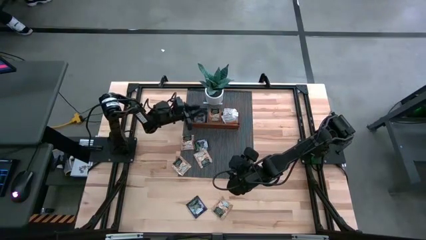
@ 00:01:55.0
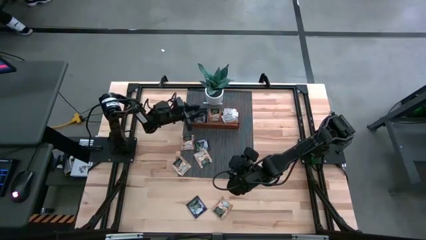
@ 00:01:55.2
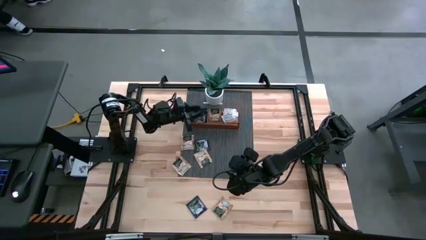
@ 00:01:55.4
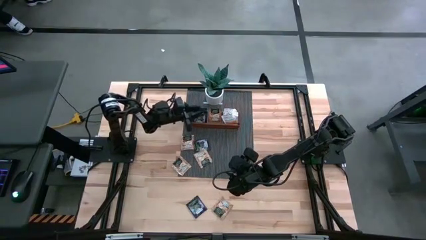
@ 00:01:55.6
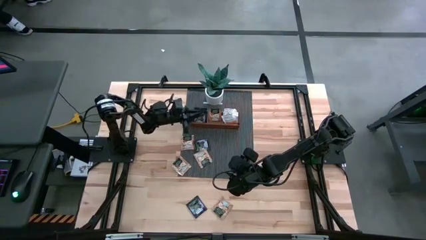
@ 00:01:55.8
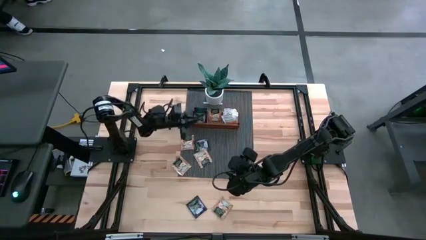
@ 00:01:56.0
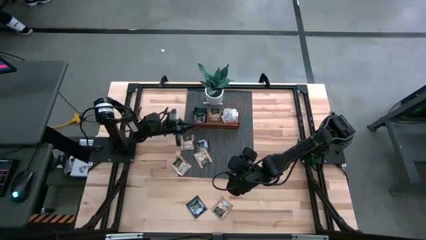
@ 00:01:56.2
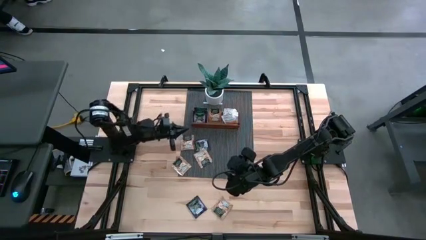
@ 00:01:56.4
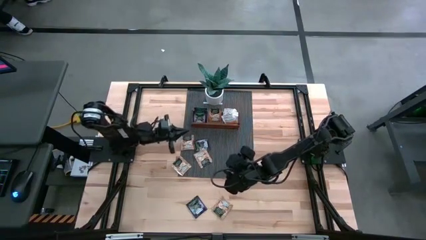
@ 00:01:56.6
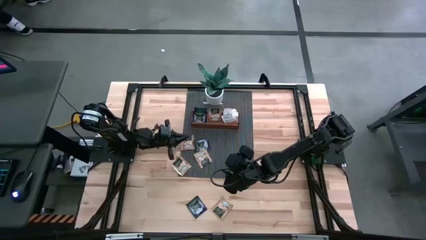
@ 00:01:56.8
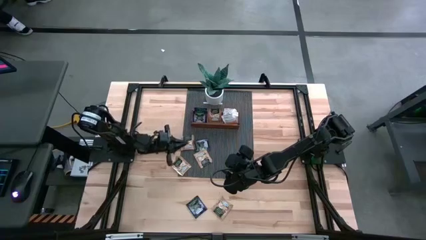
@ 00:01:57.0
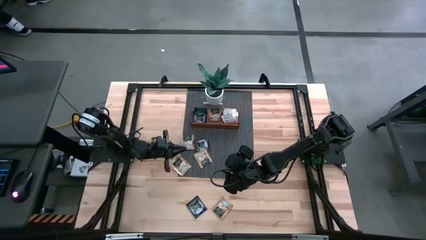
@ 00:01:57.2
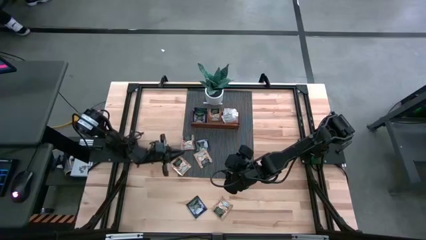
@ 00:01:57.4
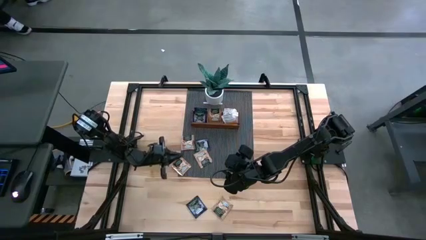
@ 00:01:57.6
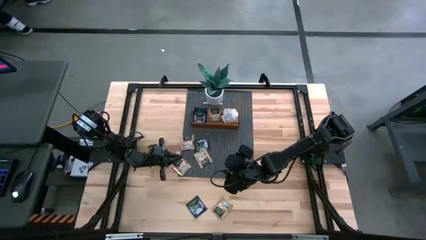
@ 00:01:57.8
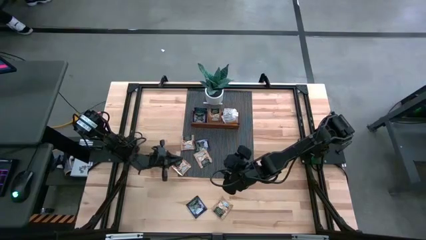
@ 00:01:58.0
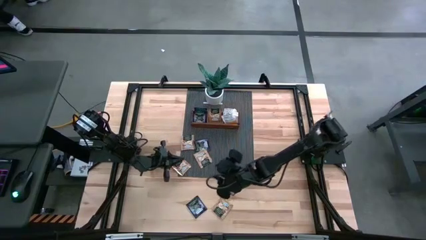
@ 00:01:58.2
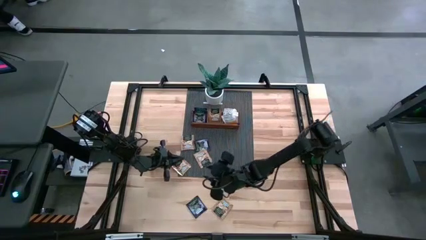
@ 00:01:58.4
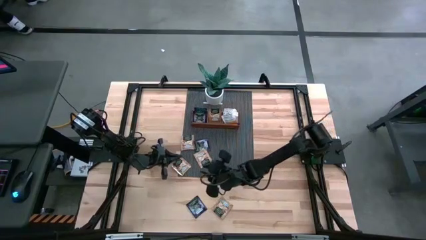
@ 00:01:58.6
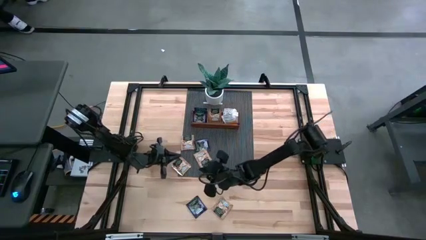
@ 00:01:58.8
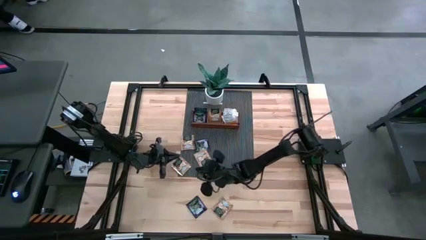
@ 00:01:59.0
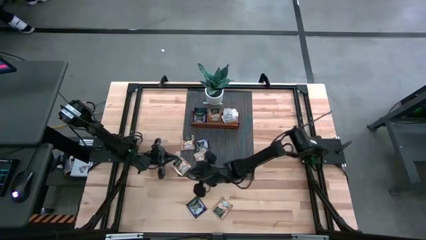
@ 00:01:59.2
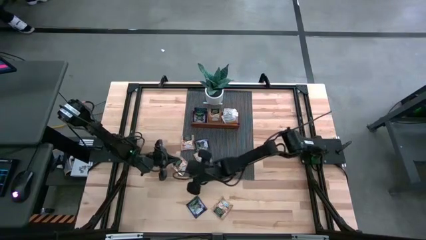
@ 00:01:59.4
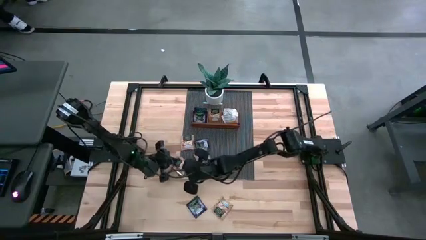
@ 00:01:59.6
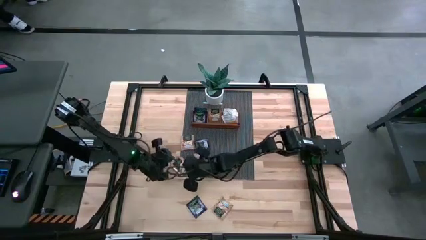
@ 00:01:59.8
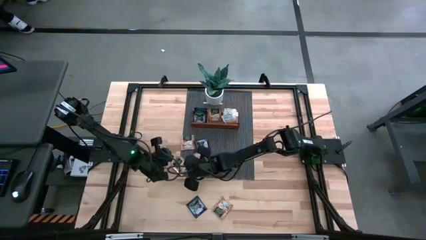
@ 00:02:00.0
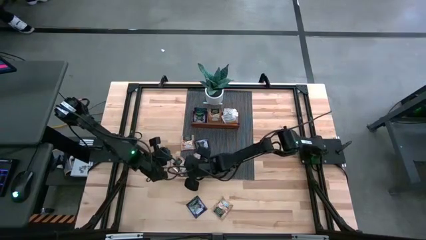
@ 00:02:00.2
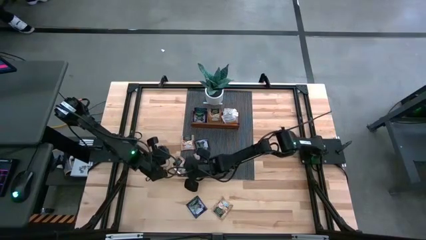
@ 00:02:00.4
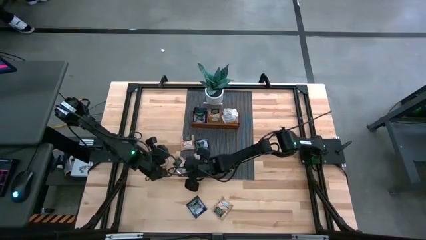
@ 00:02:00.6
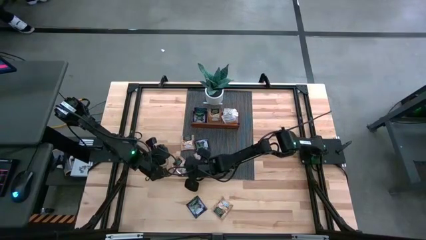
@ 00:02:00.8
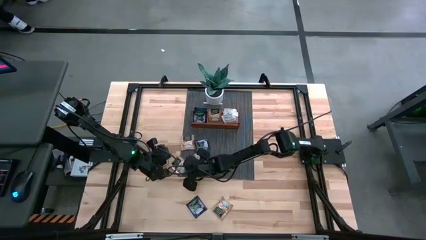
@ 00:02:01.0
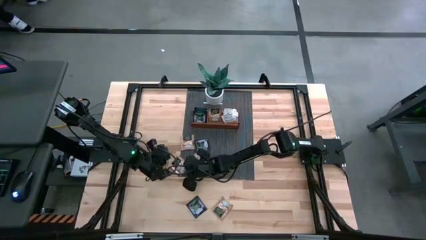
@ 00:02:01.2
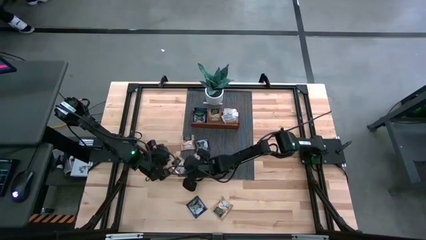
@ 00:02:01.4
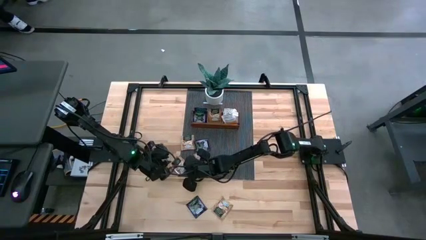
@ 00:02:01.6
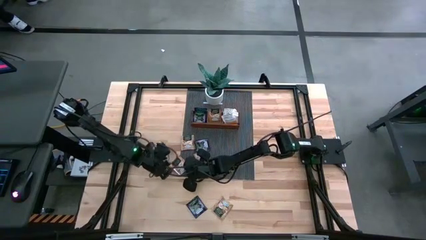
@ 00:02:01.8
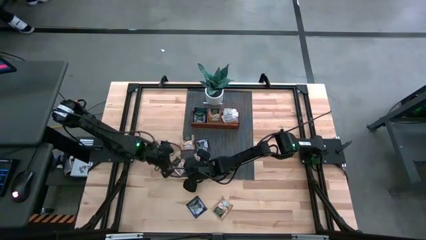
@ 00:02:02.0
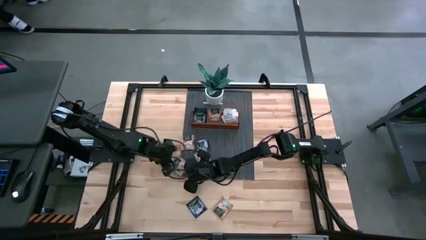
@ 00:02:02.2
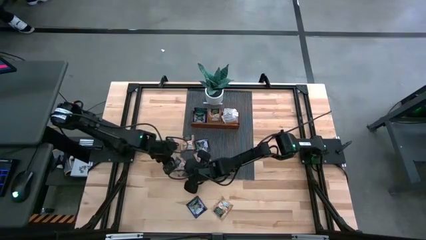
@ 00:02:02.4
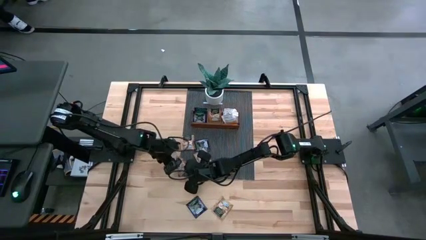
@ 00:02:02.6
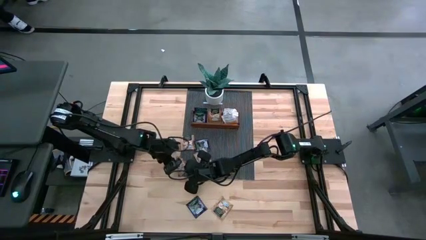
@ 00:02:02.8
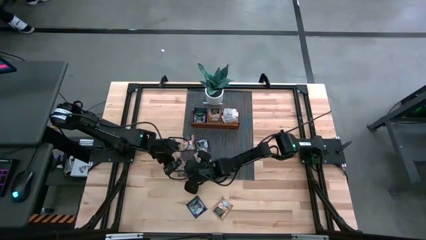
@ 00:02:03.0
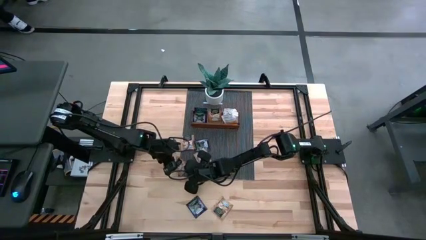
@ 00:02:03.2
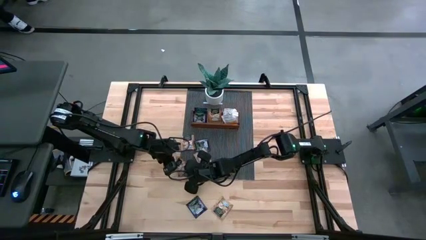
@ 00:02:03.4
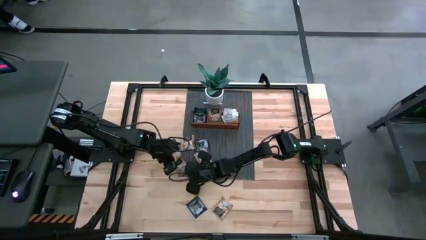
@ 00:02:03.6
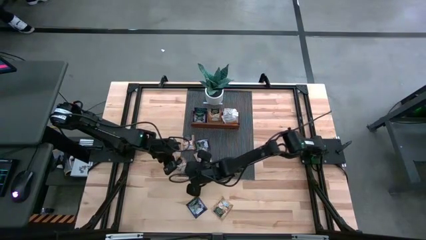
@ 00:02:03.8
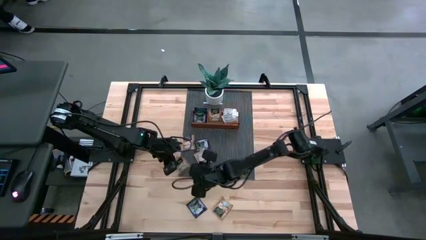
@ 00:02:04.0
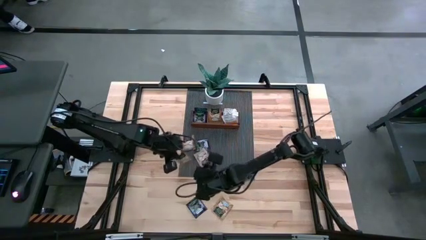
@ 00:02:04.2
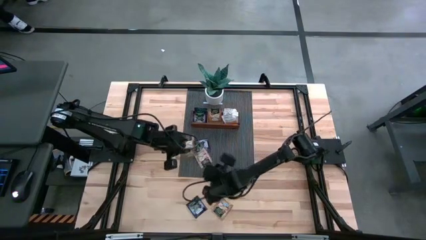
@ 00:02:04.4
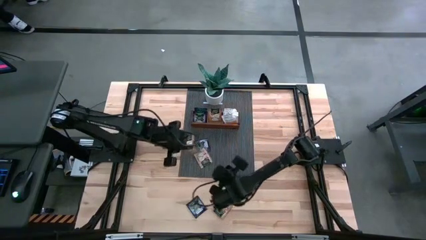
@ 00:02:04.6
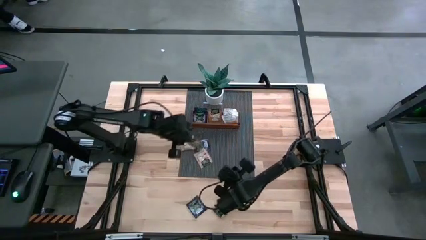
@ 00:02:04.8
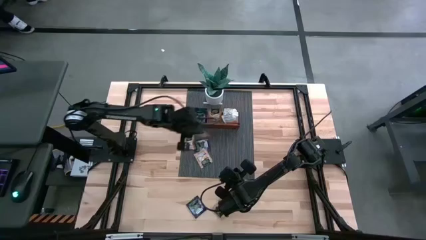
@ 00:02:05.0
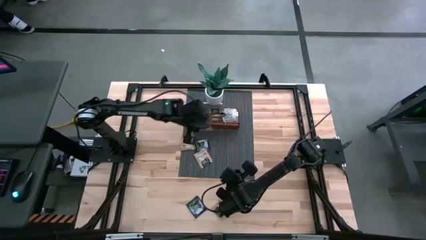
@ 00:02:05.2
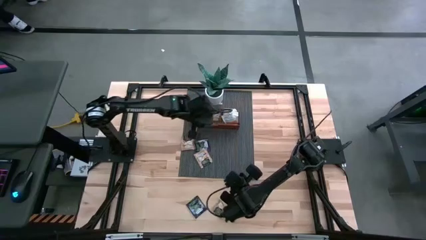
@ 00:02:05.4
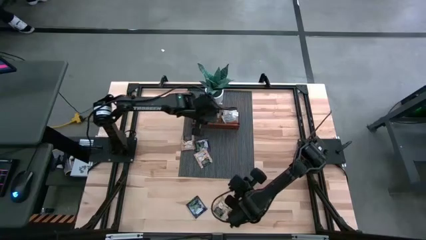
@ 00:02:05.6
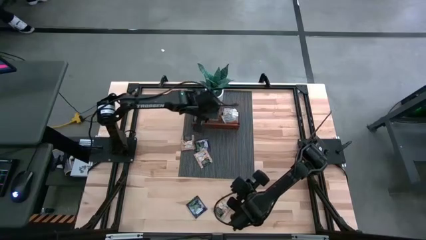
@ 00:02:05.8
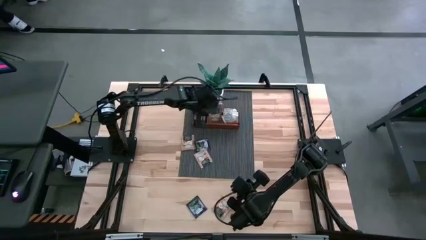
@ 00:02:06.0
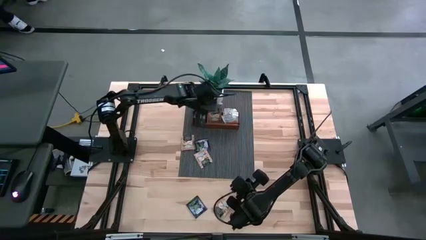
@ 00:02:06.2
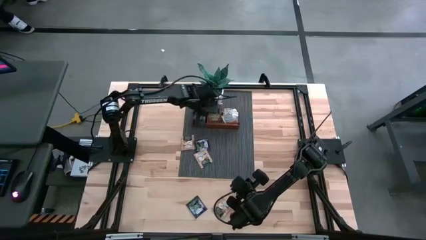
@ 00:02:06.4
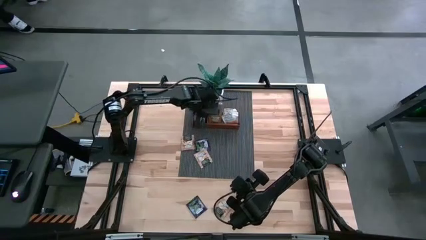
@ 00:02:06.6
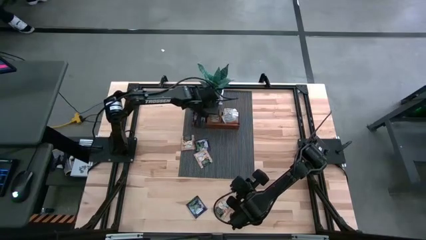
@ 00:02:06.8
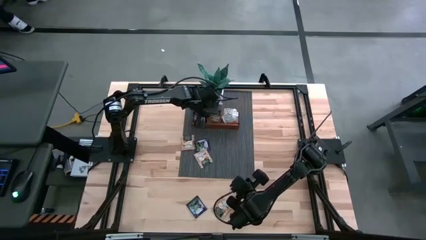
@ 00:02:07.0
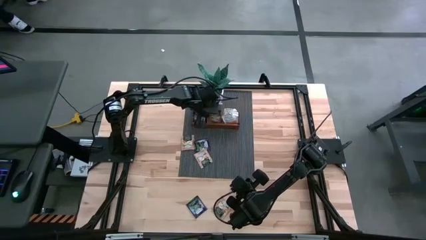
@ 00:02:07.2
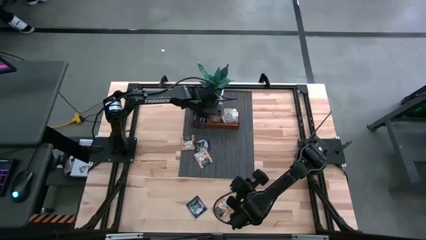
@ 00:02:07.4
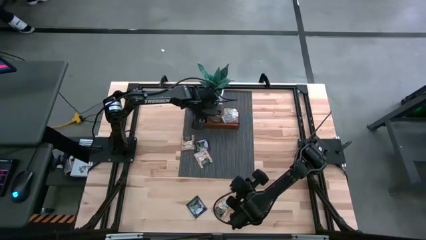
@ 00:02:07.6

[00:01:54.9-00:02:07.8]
Task: Pick & Place Tea
Put the brown tea bag into the middle section of the wooden organizer

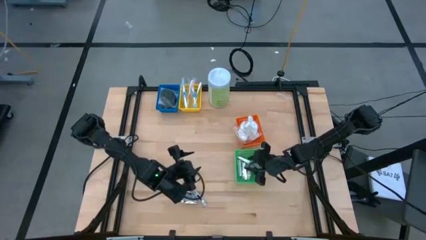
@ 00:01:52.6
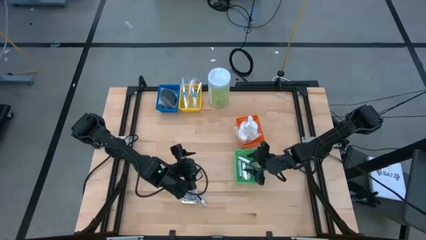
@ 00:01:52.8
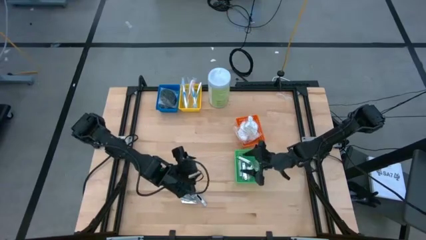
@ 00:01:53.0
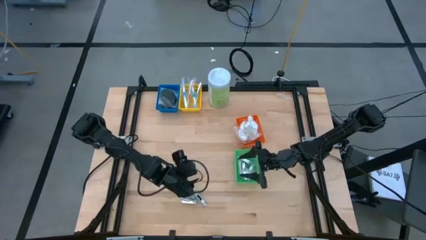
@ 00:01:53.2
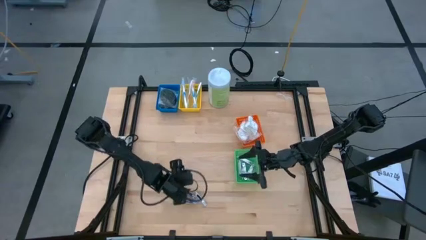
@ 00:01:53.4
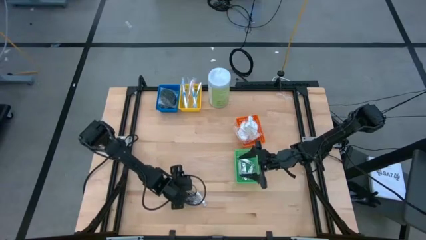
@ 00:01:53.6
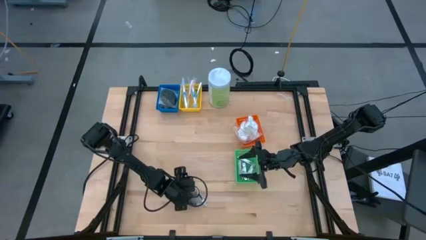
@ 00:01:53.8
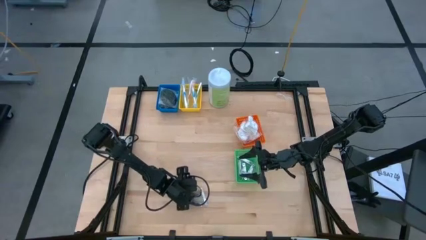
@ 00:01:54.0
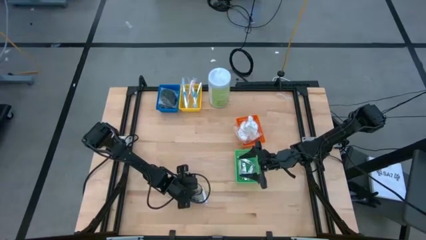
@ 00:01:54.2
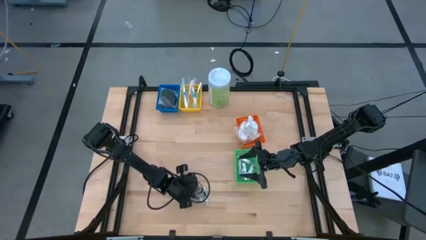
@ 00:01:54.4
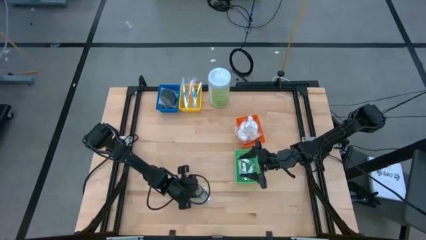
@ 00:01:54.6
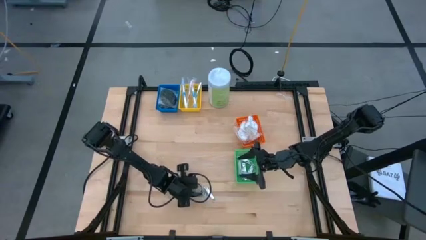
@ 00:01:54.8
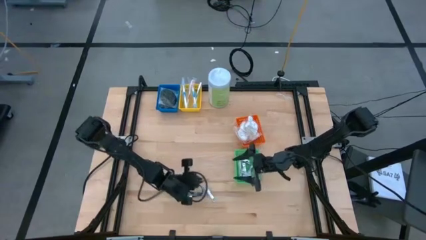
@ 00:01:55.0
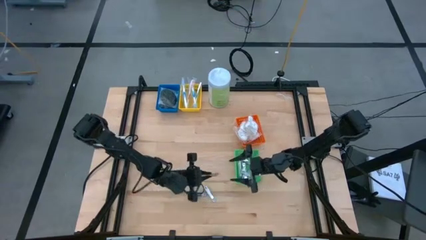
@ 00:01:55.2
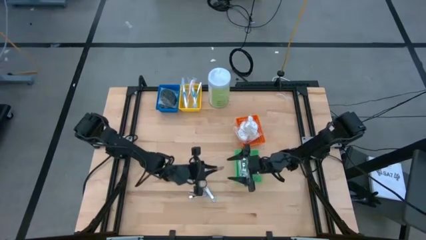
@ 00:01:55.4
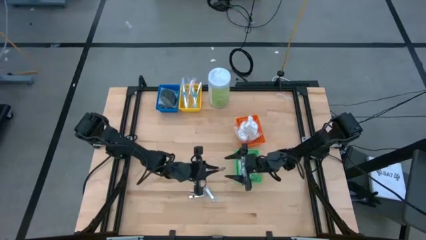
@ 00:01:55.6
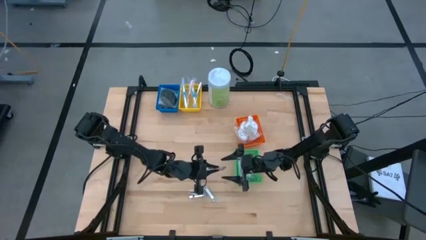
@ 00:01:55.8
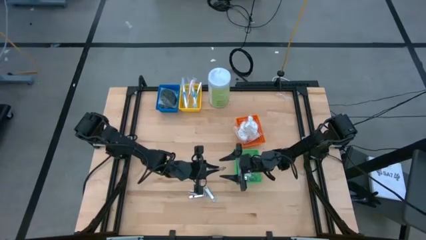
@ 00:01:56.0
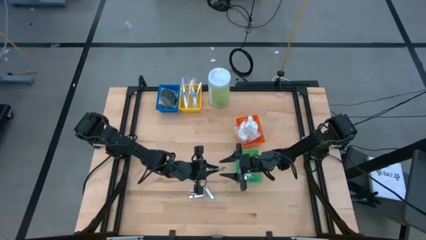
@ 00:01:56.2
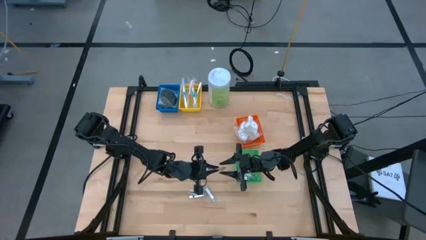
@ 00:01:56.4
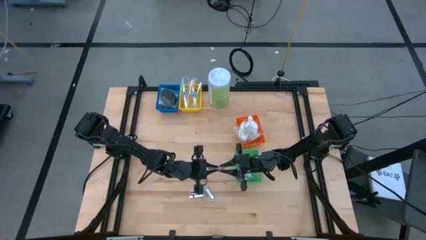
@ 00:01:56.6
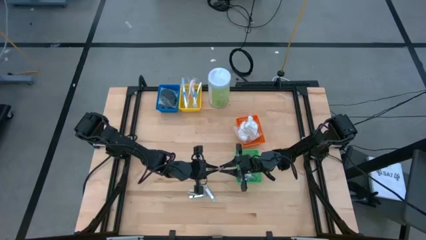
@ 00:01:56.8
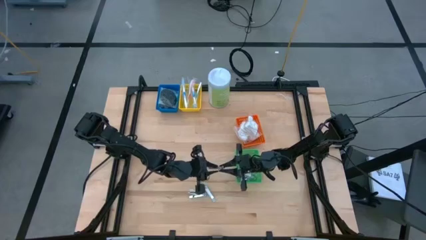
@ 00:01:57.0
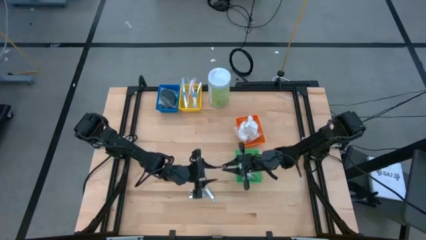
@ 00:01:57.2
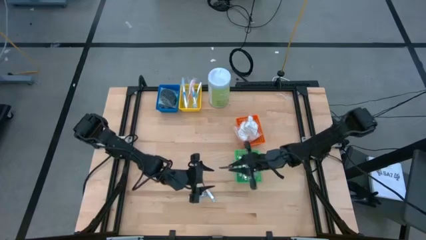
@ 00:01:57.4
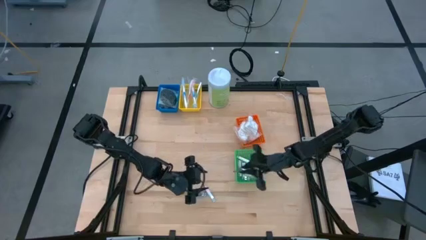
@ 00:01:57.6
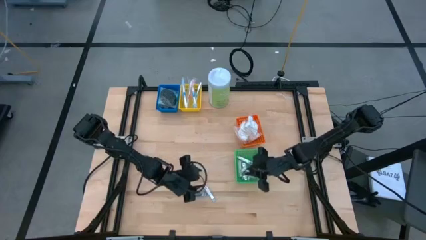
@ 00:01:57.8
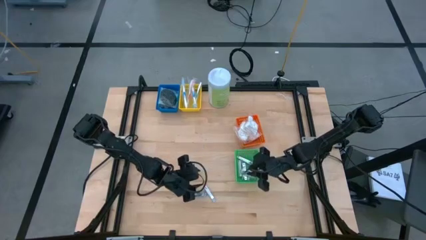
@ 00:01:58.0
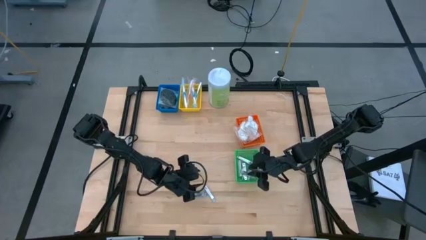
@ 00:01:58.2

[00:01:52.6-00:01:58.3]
Task: Pick & Place Travel size toiletries
Put the nail cutter into the green bin
